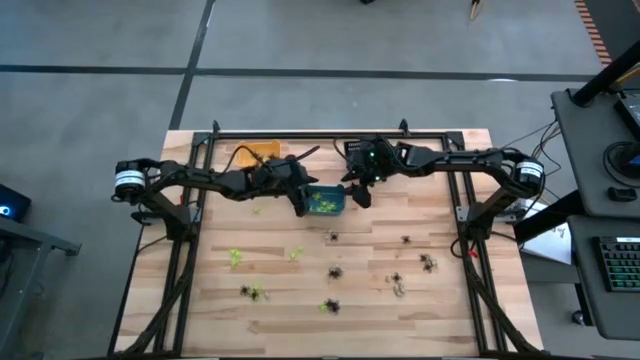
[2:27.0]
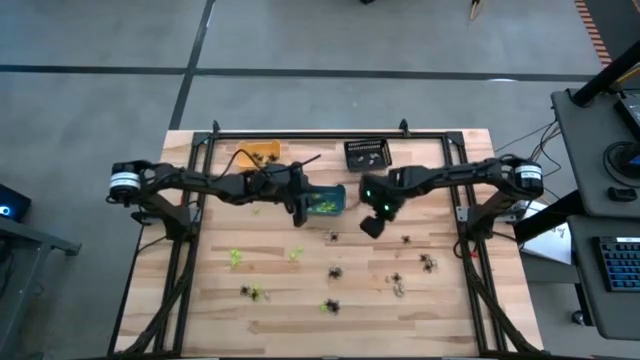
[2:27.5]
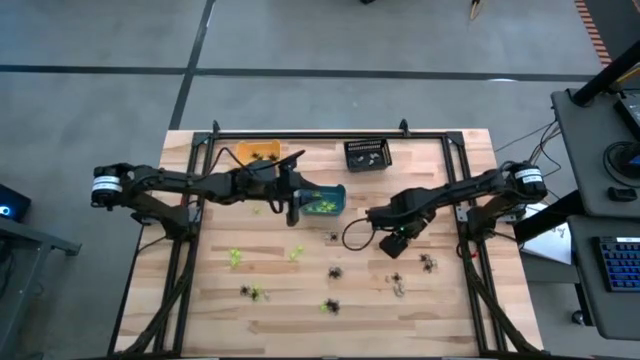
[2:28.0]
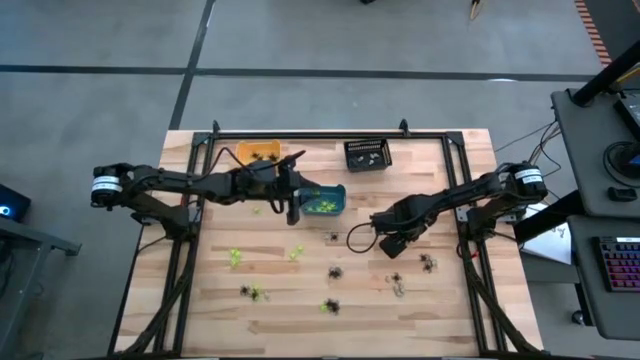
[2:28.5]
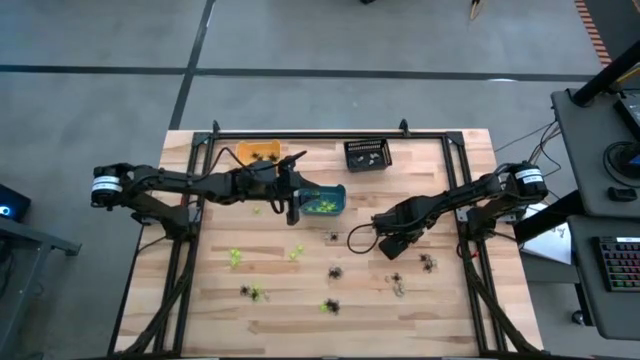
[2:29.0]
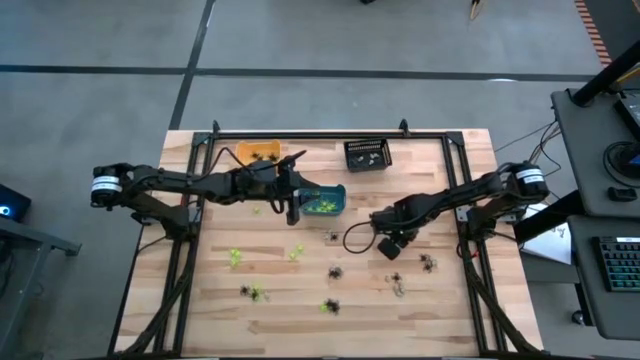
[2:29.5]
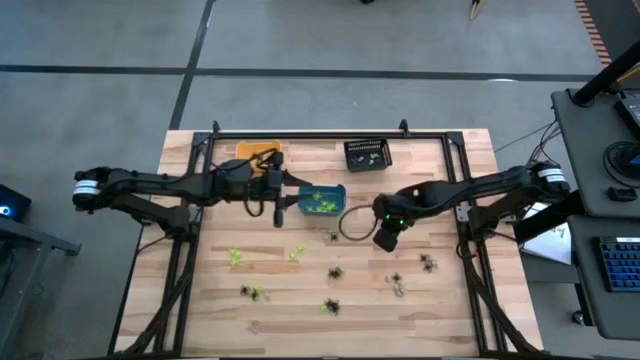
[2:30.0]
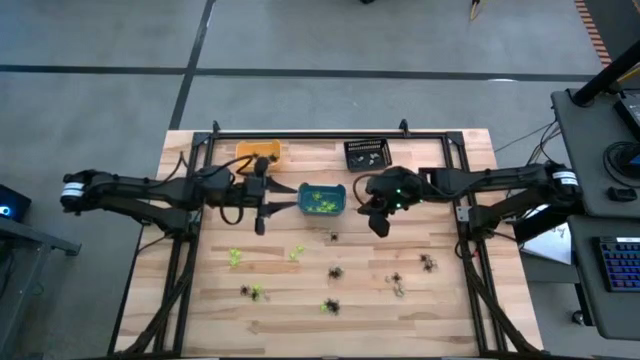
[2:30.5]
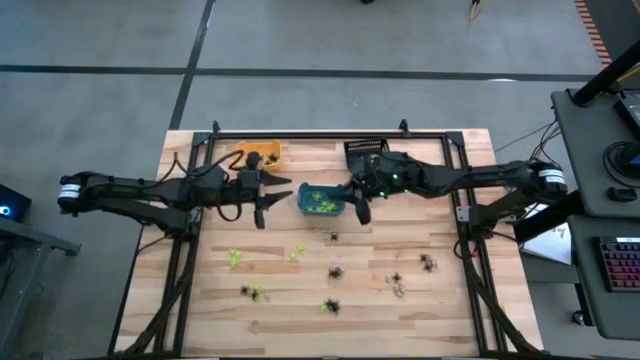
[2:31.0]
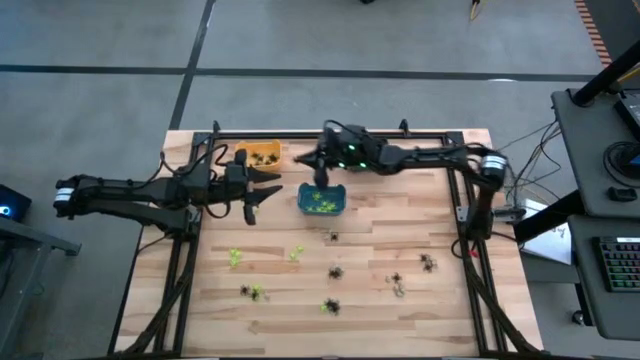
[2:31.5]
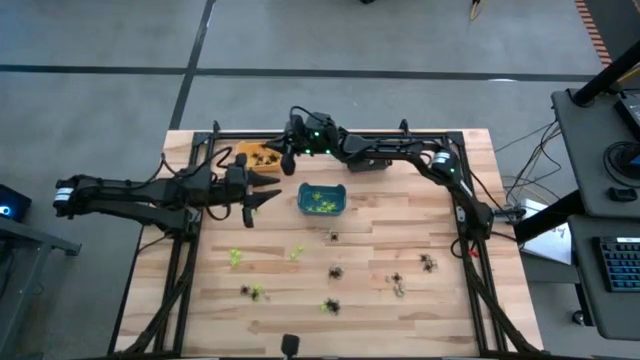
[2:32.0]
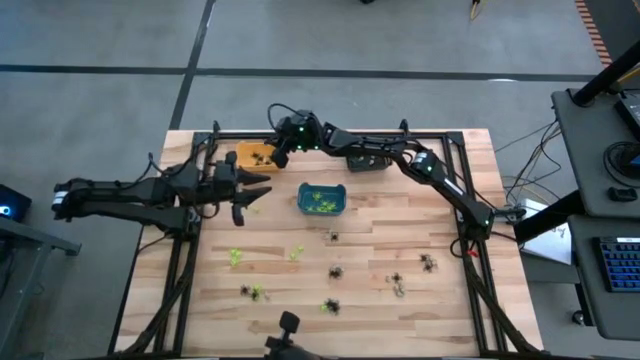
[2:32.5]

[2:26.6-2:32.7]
Task: Sort Halloween decoration
Put the black spider toy into the yellow bin

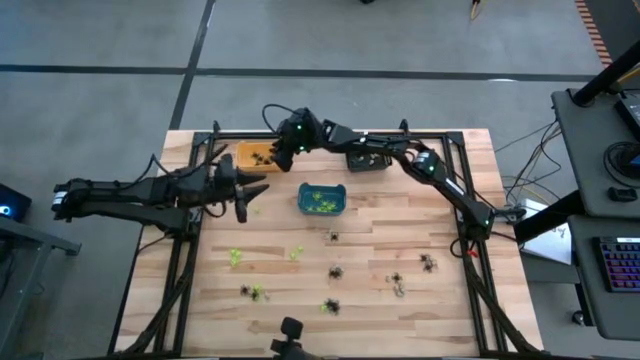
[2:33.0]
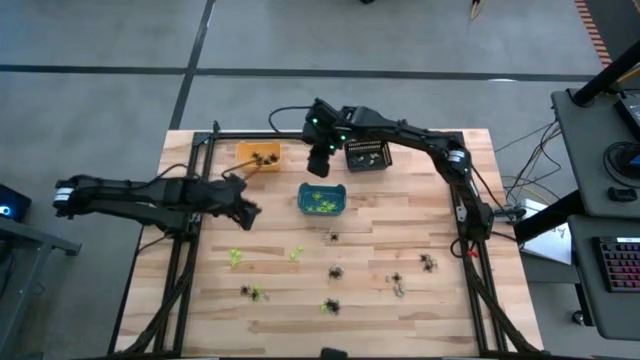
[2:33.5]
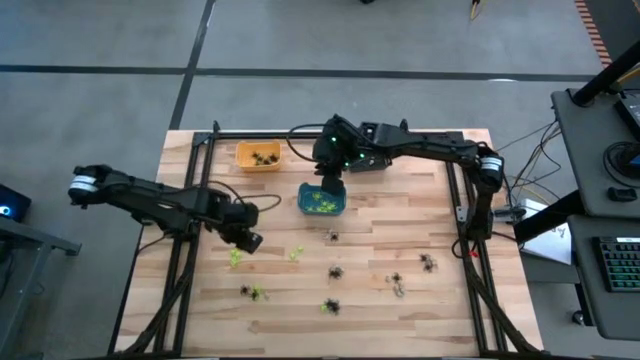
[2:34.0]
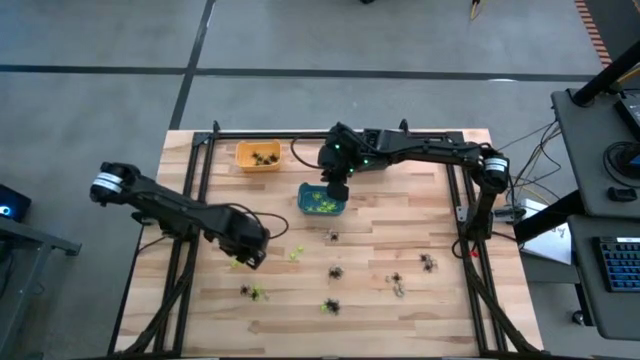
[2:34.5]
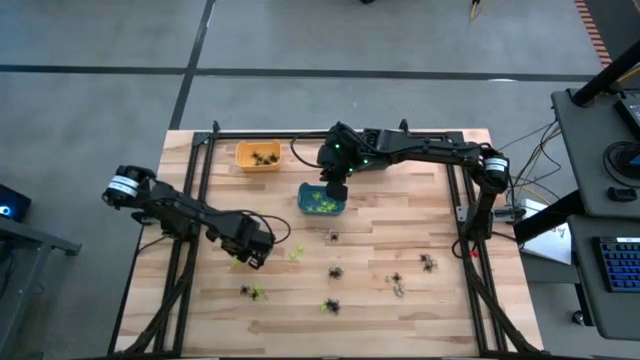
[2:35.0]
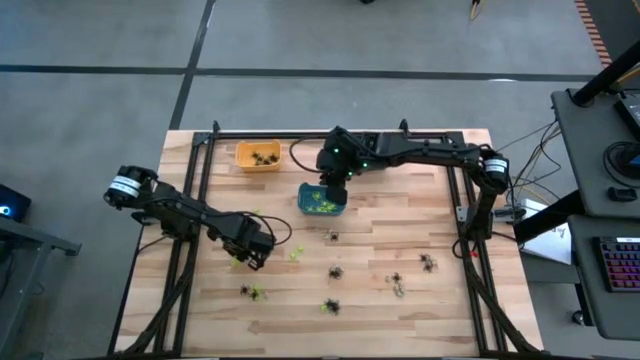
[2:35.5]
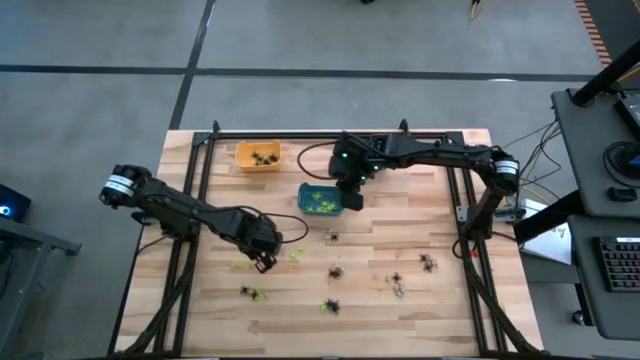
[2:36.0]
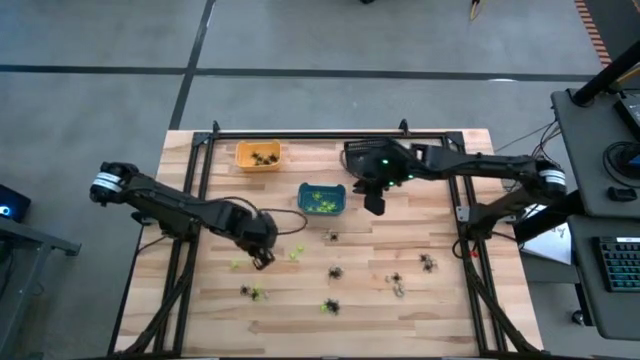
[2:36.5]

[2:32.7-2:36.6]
Put the green spider toy into the blue bin

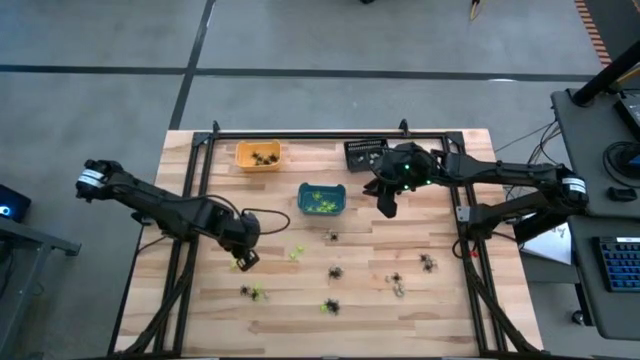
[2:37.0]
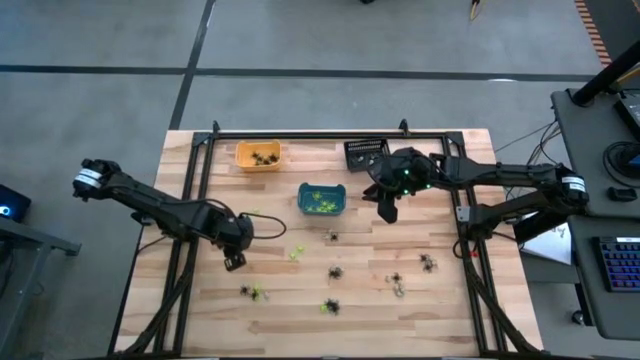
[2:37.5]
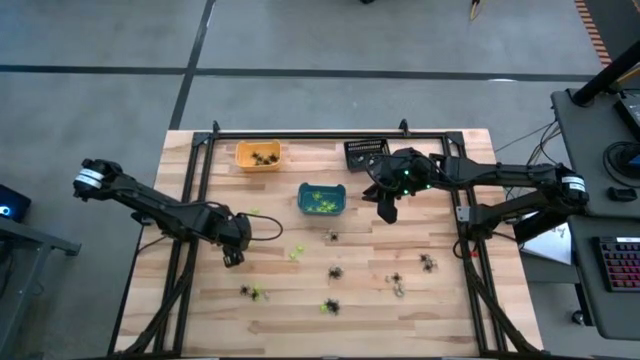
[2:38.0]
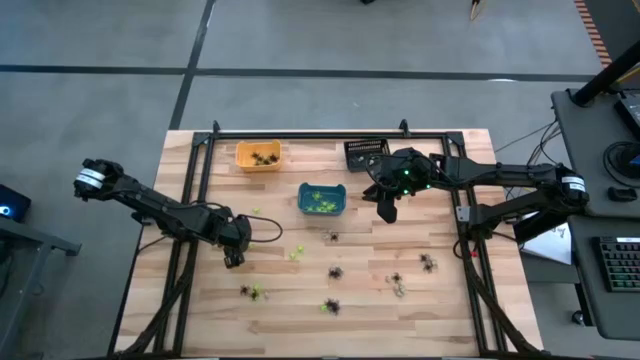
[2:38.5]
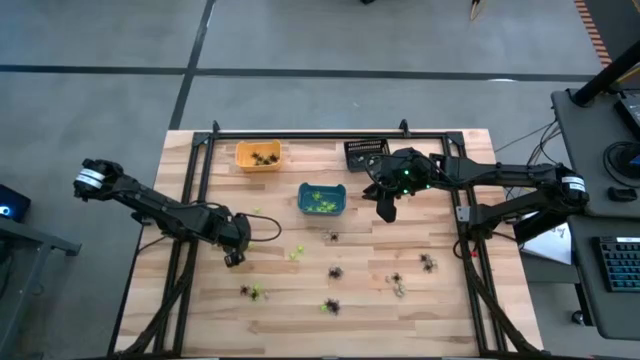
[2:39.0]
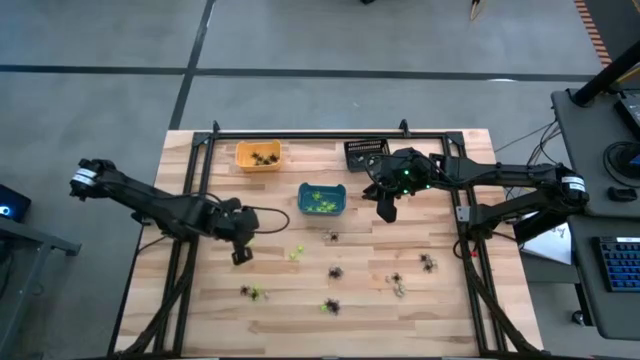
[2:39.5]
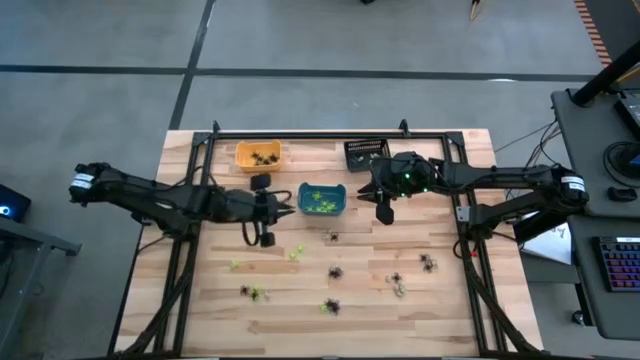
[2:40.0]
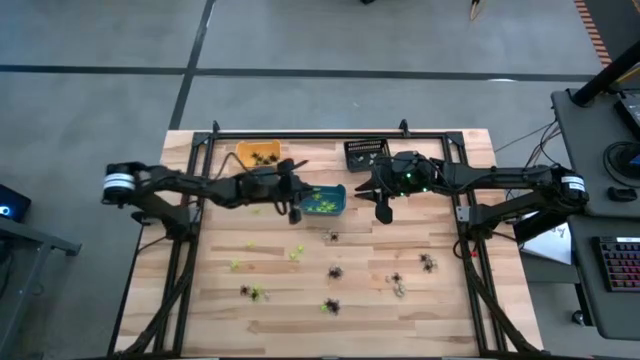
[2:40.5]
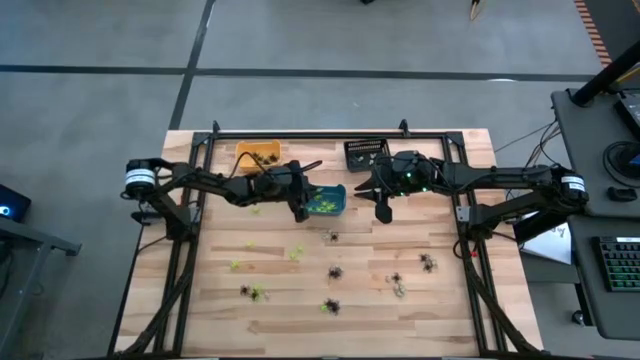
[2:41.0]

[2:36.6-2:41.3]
Put the green spider toy into the blue bin

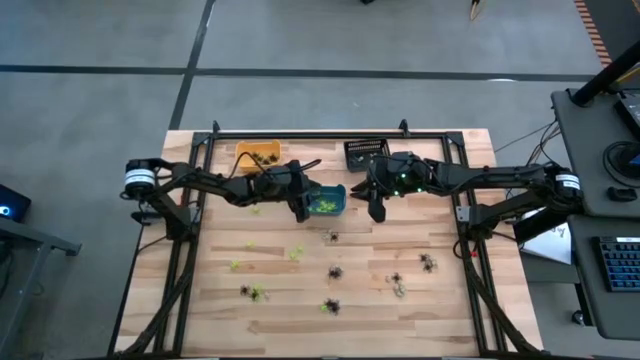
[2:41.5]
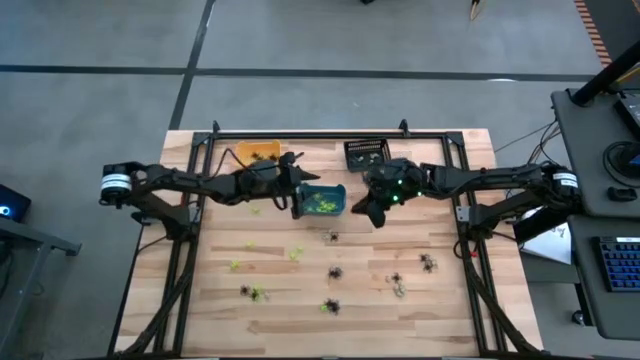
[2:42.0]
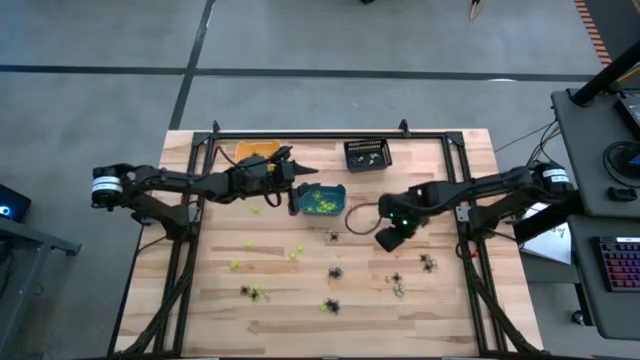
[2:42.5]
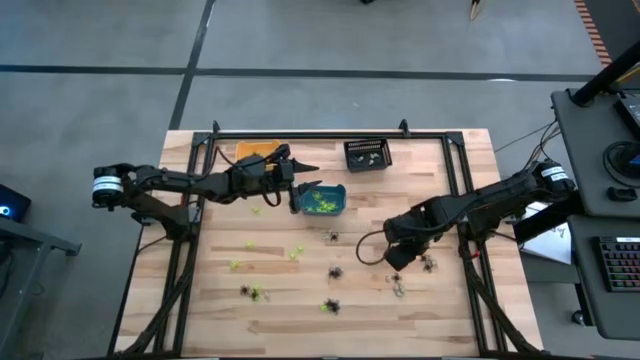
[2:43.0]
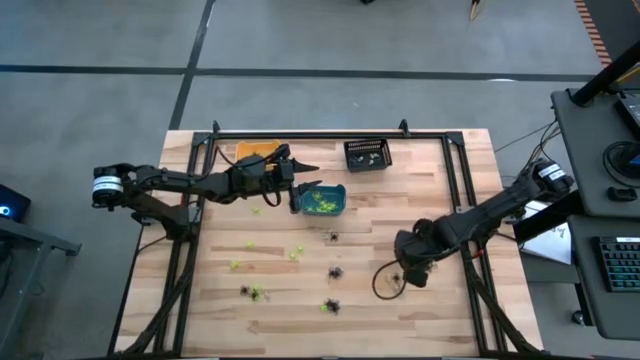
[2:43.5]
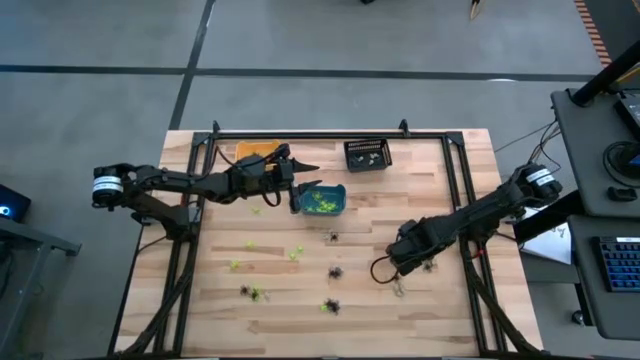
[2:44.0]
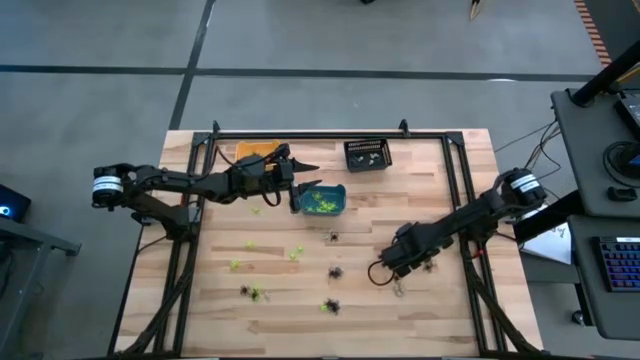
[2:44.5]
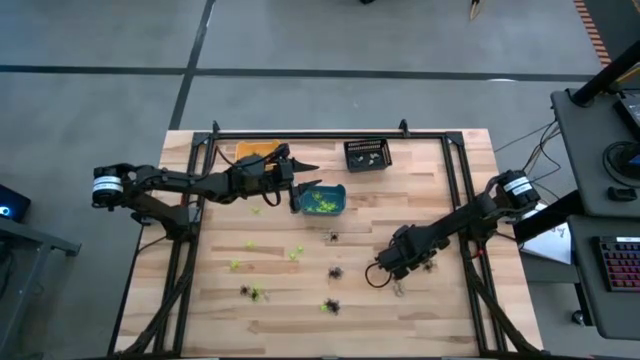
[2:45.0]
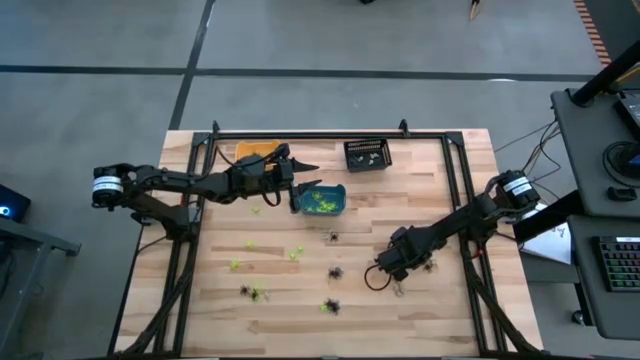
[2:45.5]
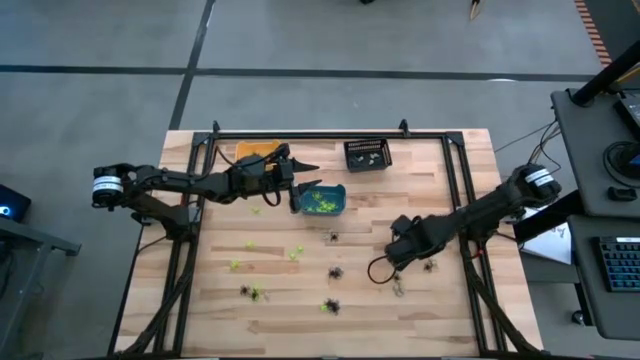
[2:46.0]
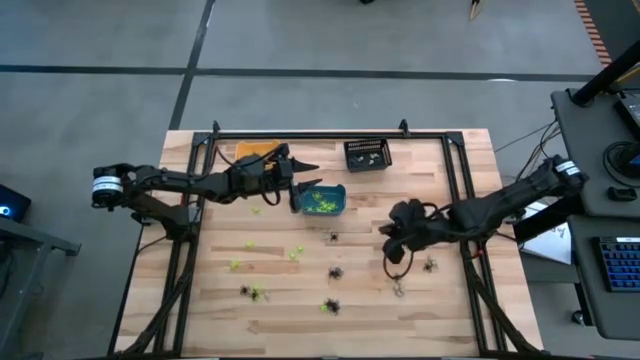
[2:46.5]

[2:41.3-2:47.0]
Put the black spider toy into the yellow bin
